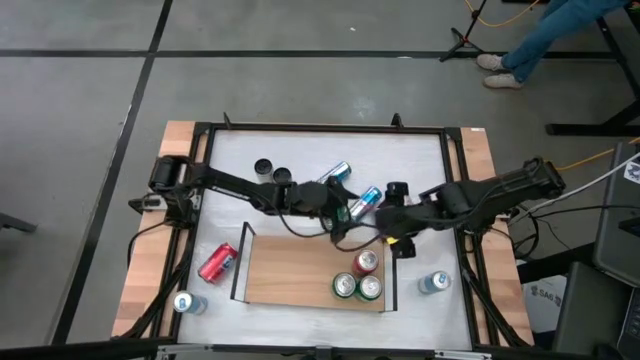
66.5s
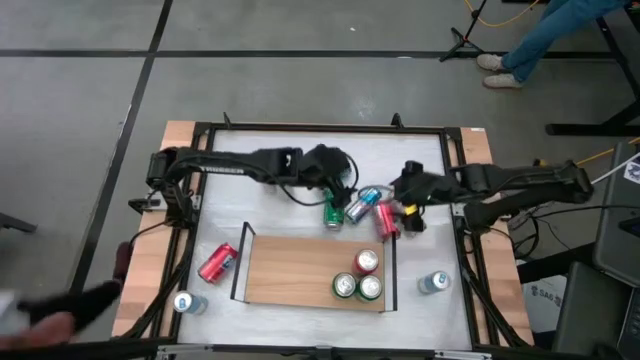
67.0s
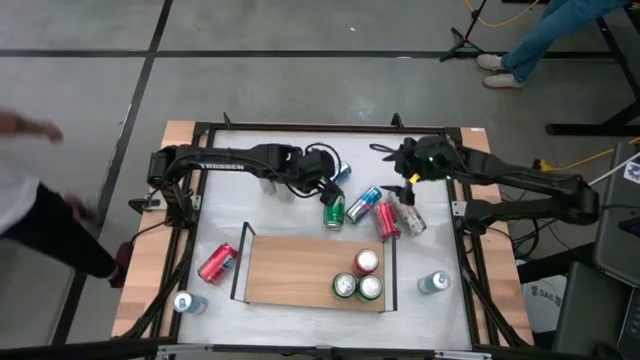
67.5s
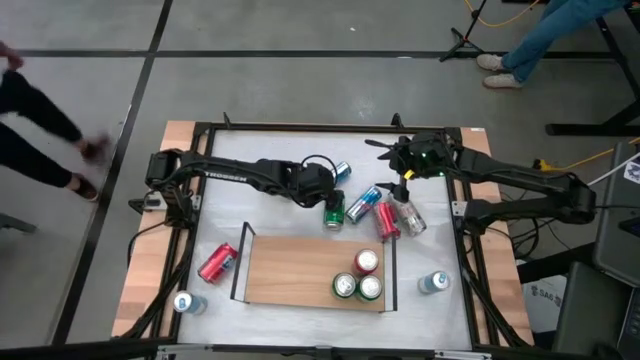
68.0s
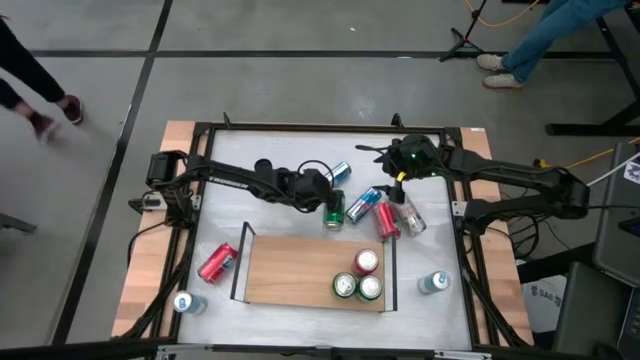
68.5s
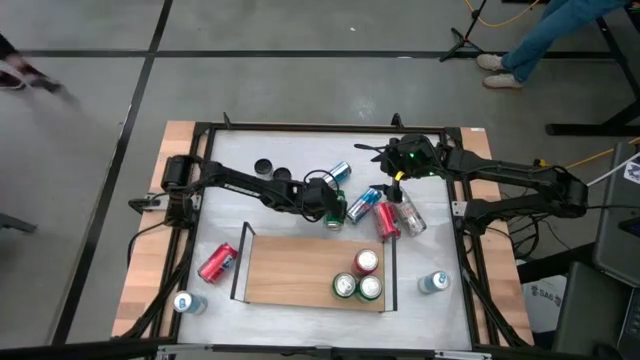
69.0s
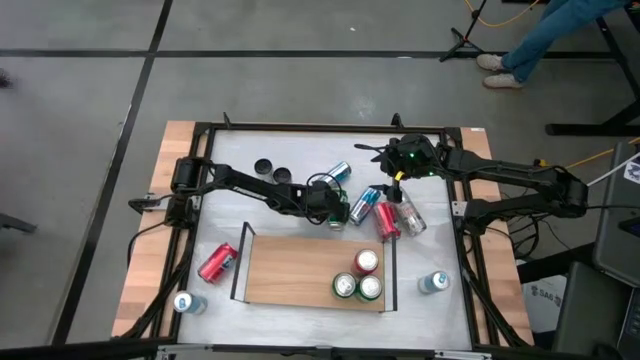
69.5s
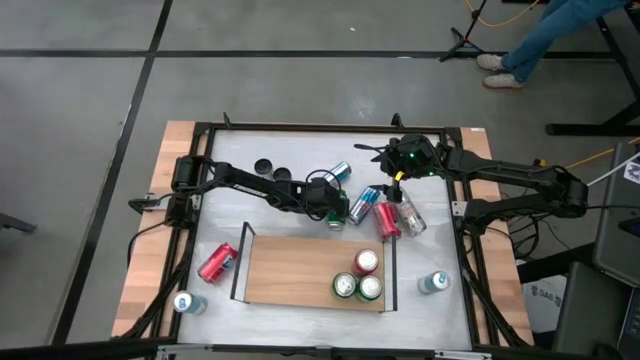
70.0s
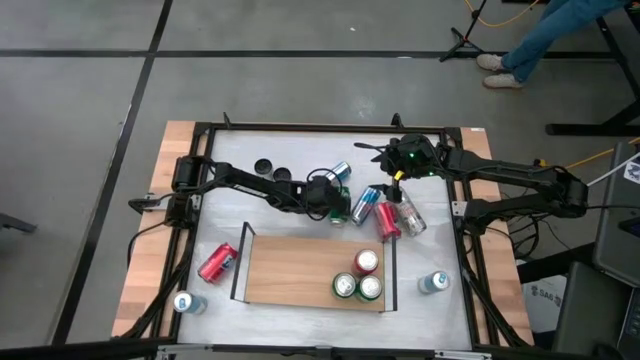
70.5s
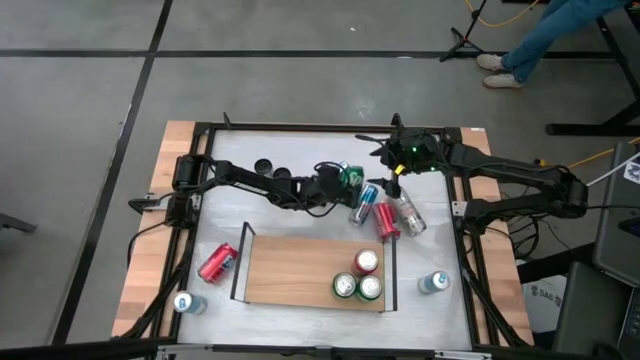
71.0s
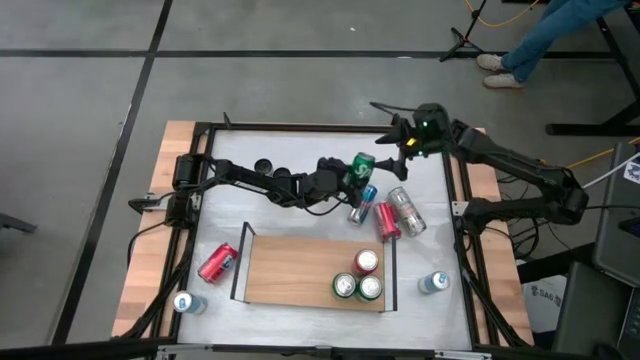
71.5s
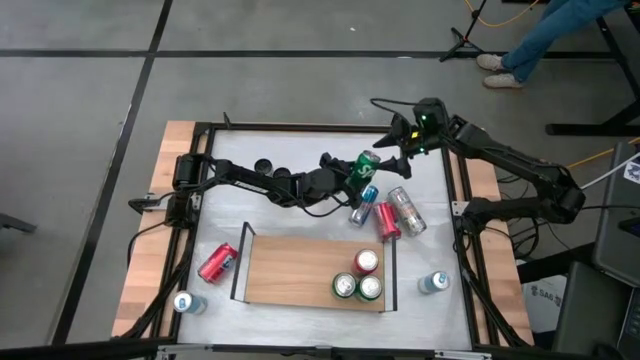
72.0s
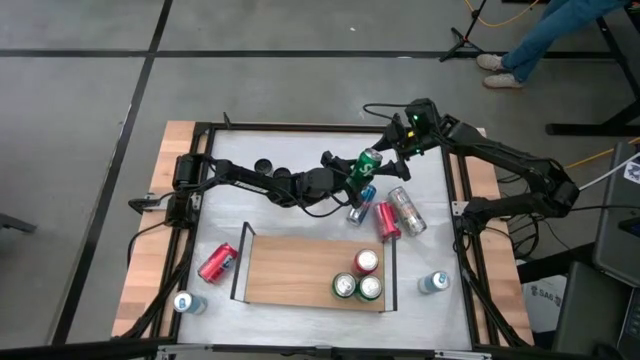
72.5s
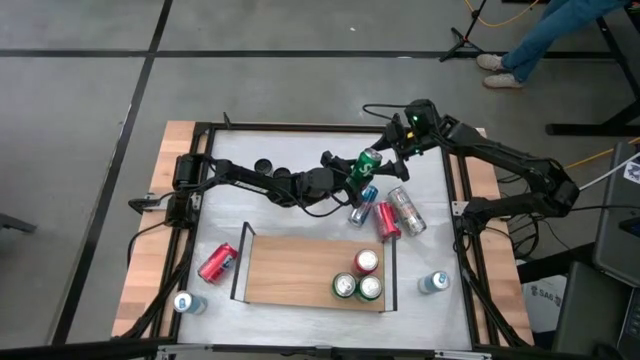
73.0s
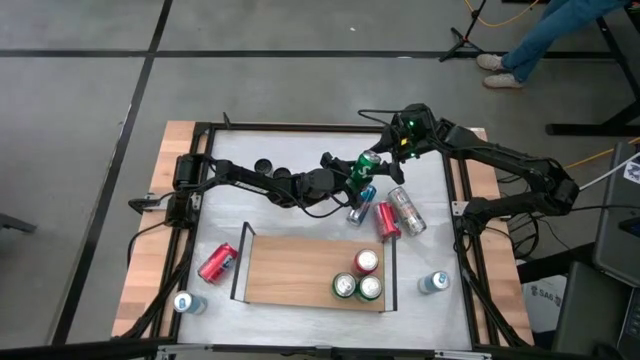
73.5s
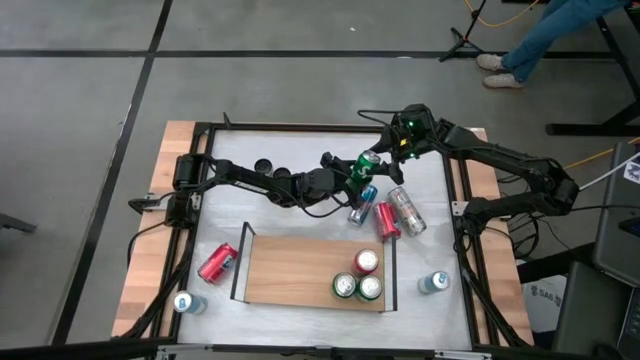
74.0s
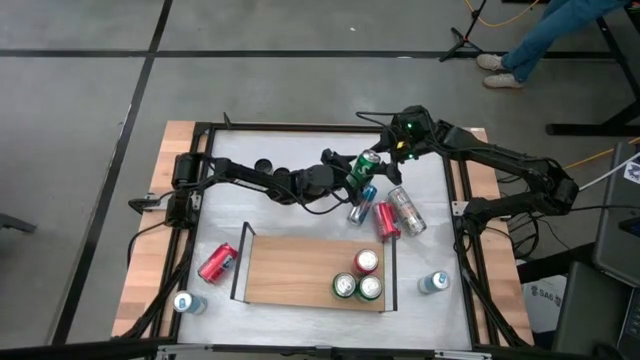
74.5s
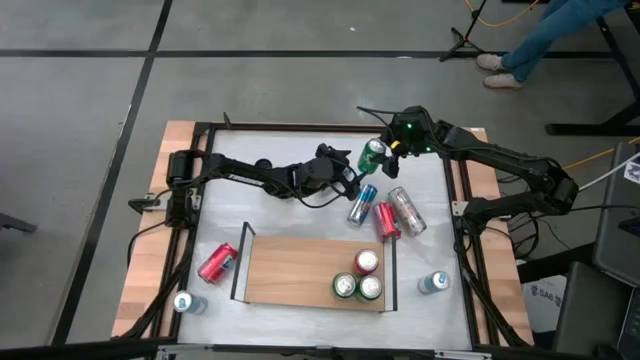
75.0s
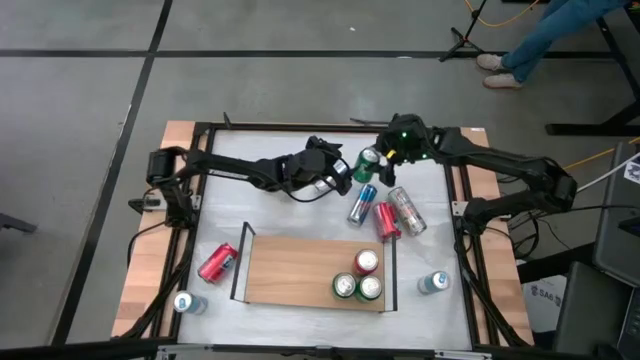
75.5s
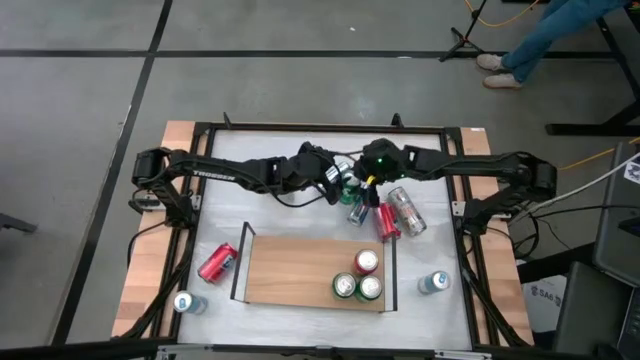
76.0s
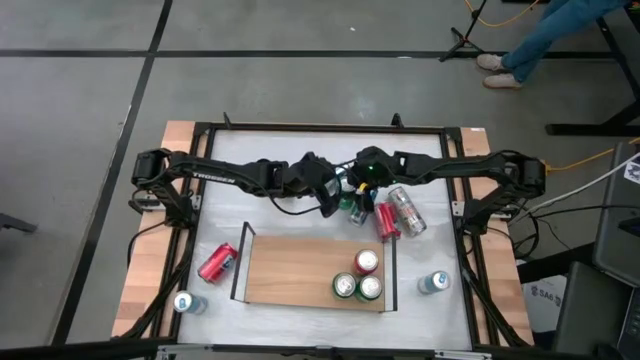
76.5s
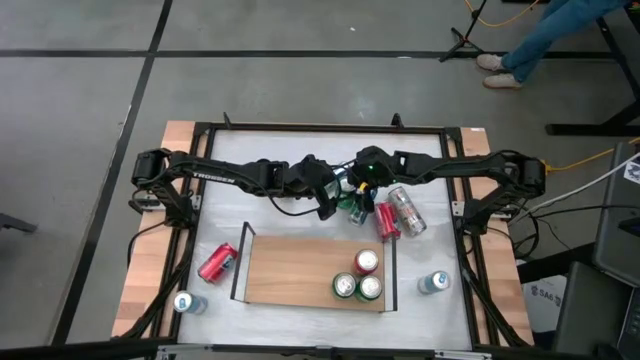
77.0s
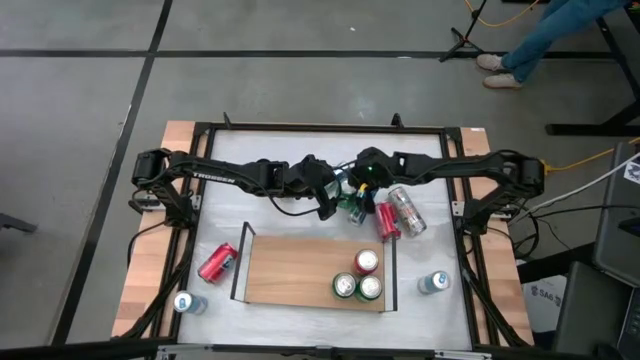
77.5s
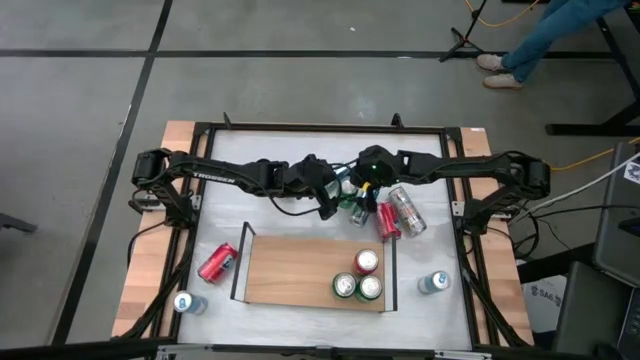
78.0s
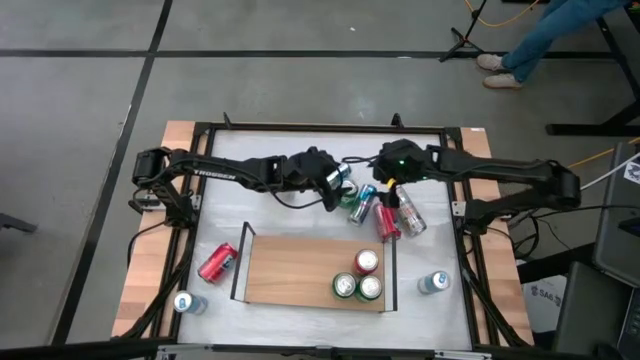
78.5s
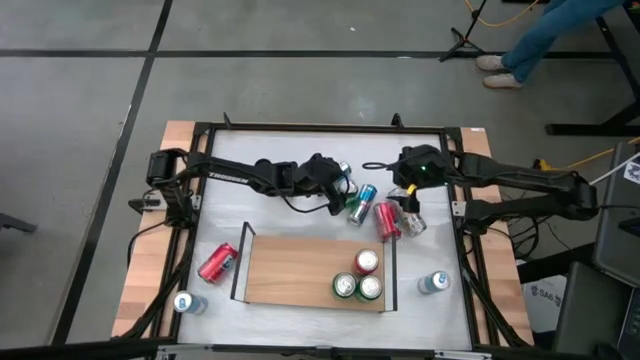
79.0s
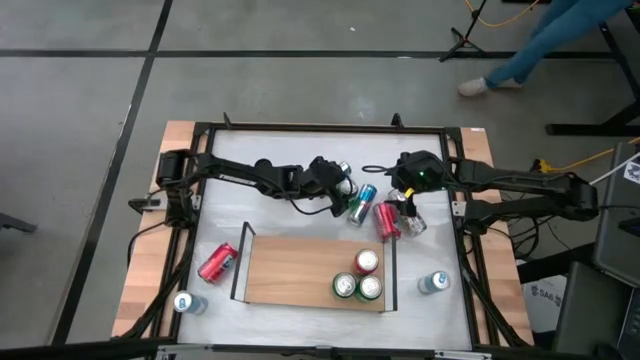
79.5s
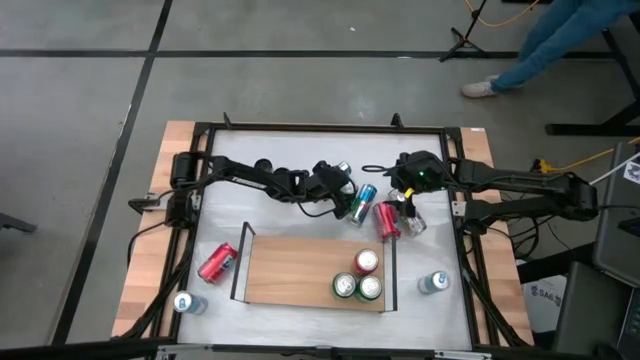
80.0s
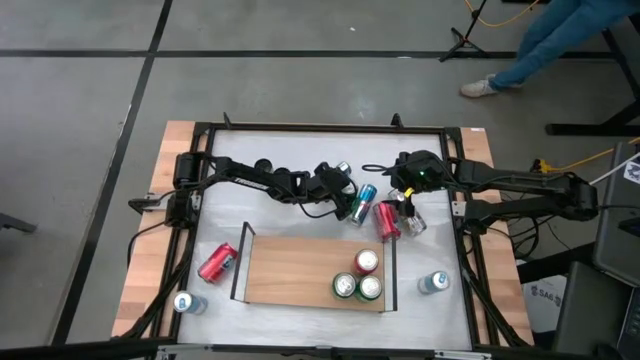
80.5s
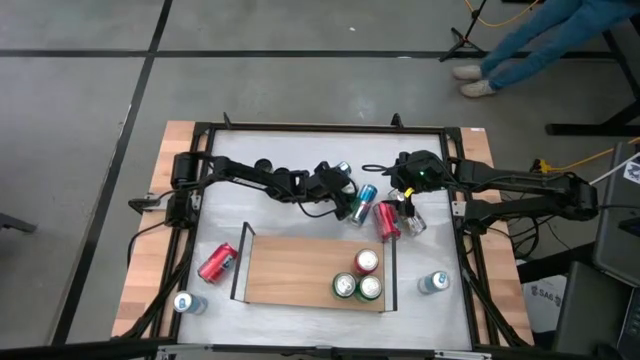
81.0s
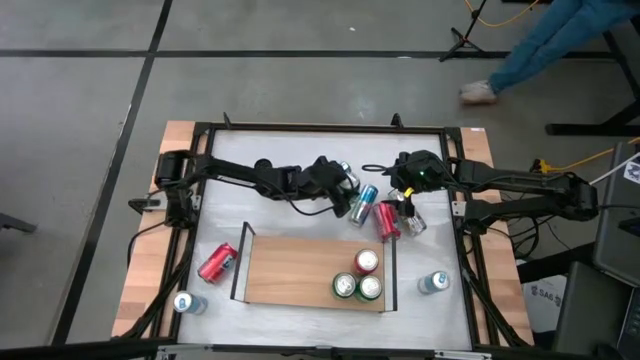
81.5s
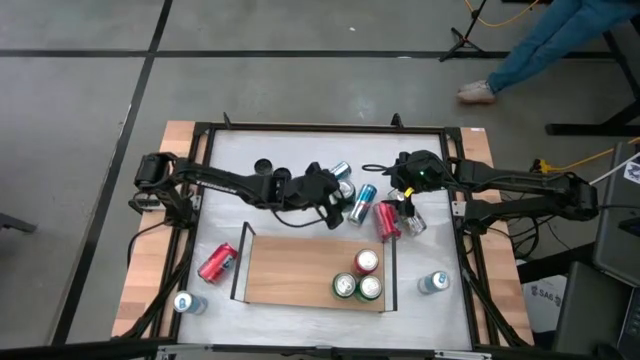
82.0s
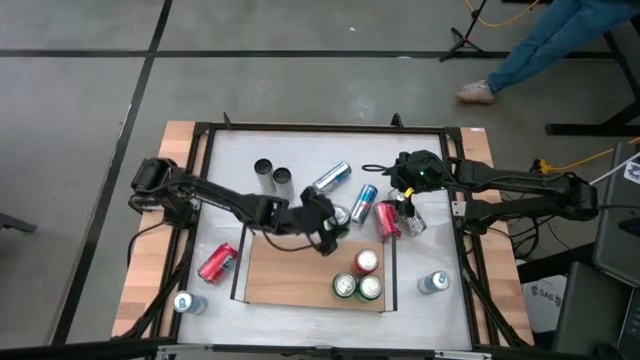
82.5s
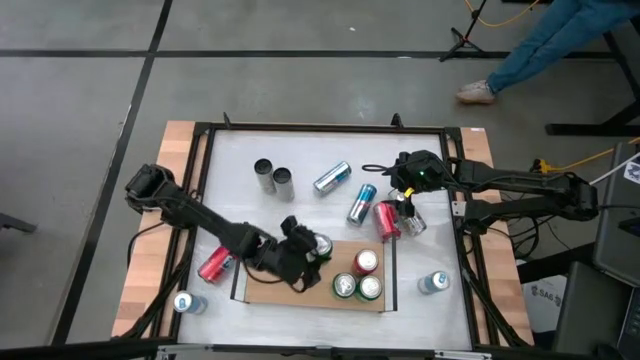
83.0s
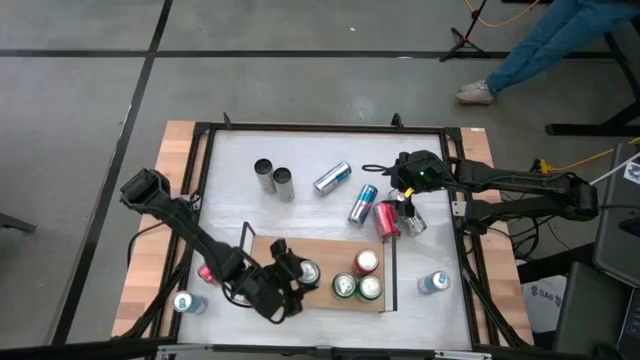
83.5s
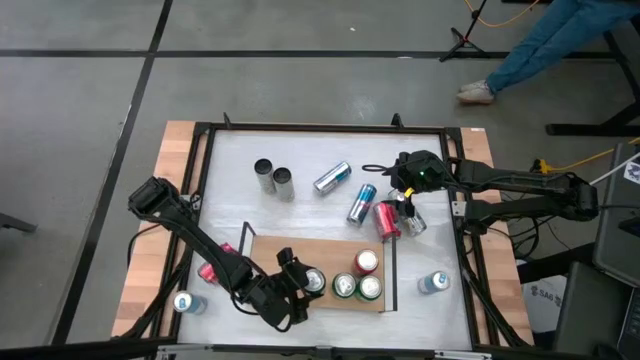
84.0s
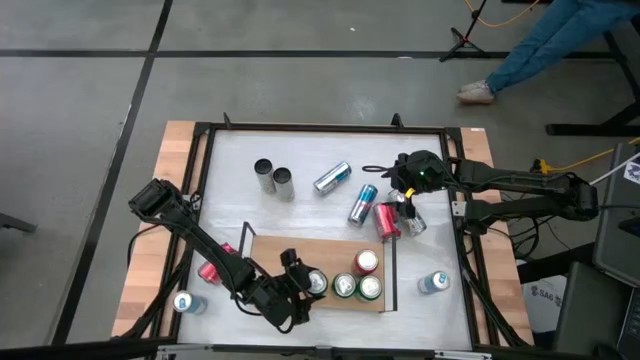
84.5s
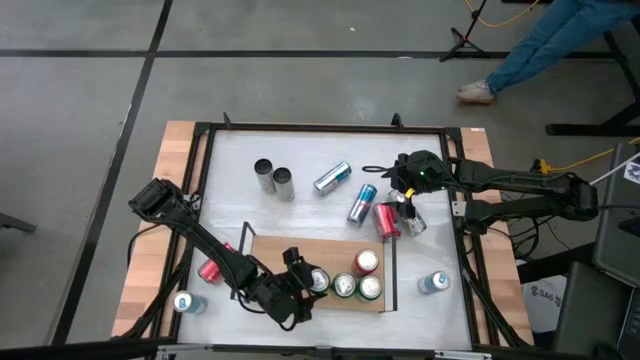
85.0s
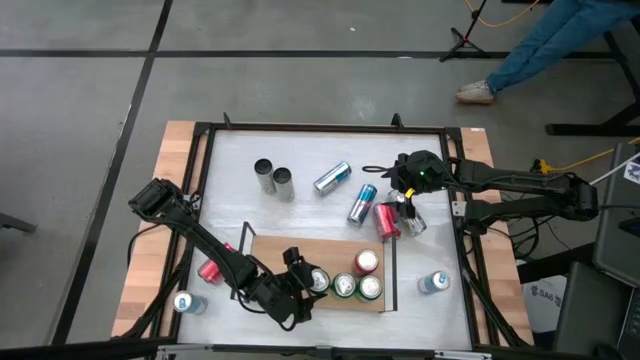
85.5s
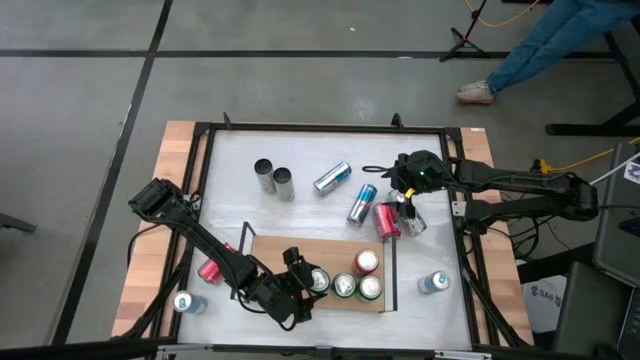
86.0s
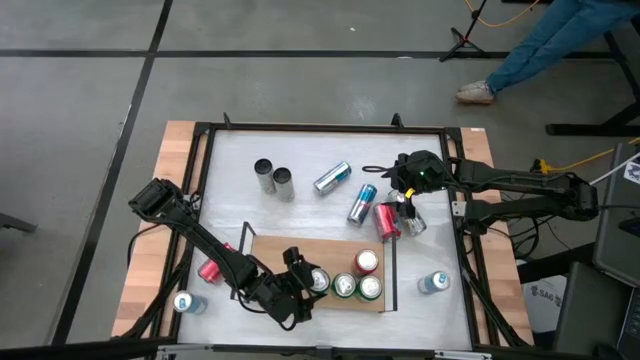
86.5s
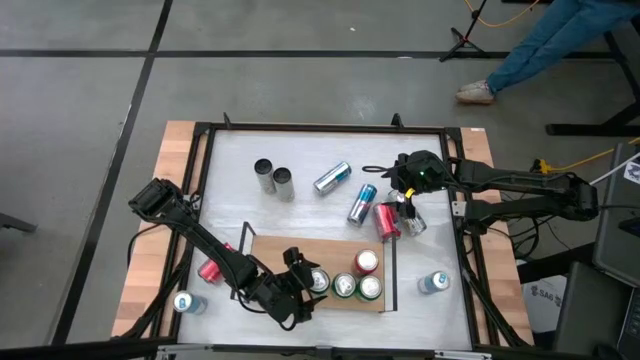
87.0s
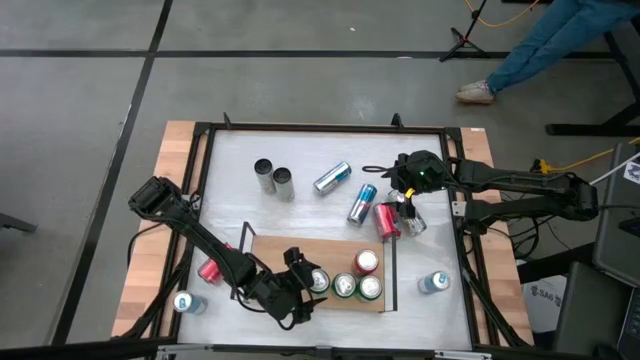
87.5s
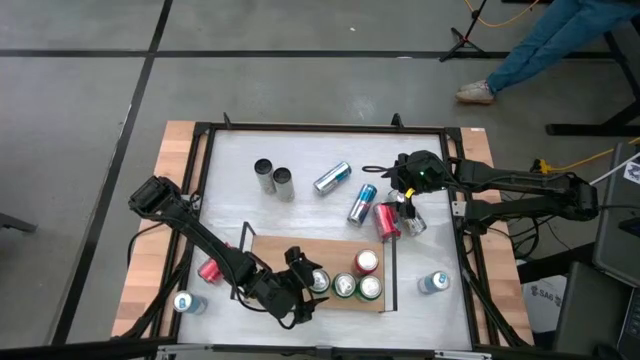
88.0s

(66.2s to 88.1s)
Task: Place canned beverage on shelf
Put the green soda can on the shelf aligned with the other green soda can
